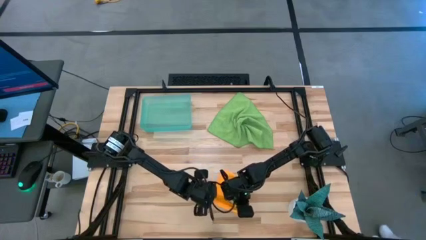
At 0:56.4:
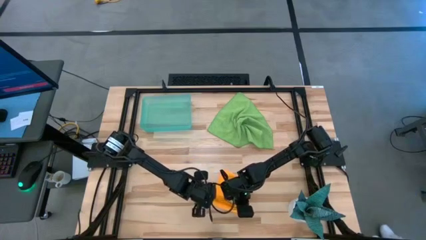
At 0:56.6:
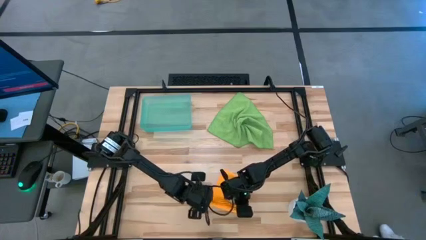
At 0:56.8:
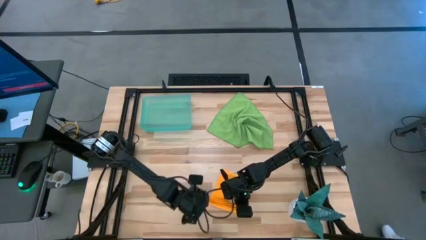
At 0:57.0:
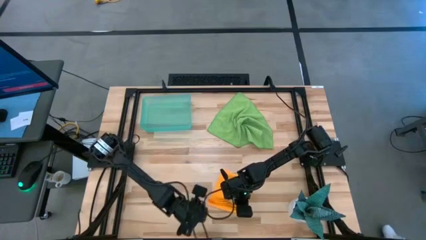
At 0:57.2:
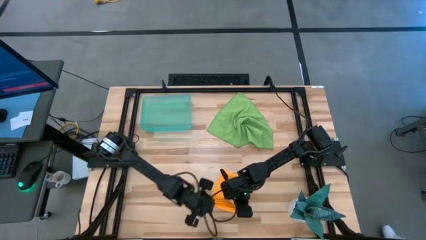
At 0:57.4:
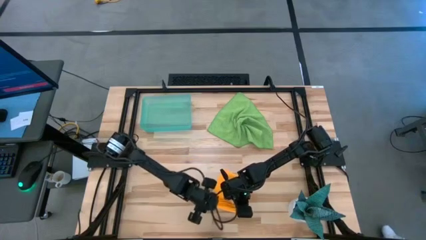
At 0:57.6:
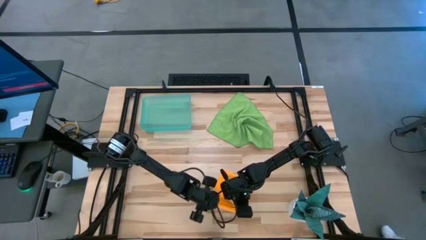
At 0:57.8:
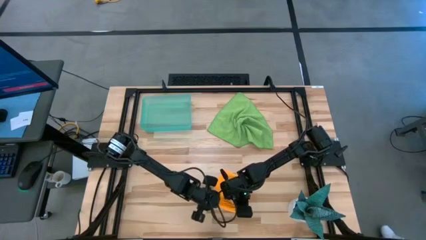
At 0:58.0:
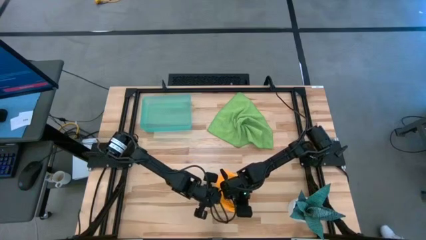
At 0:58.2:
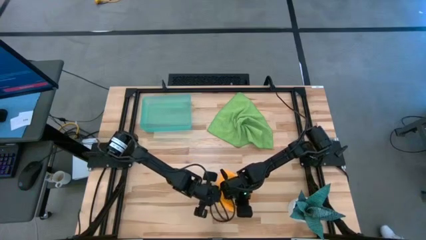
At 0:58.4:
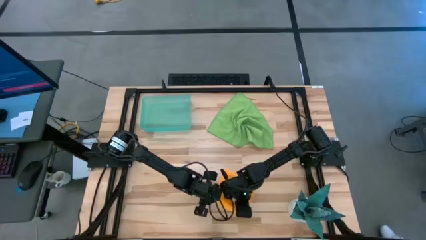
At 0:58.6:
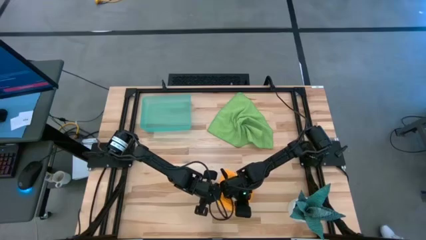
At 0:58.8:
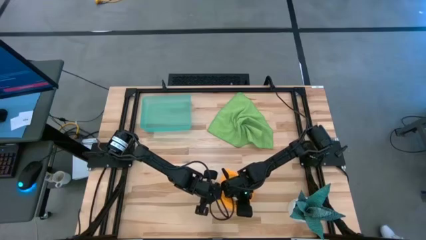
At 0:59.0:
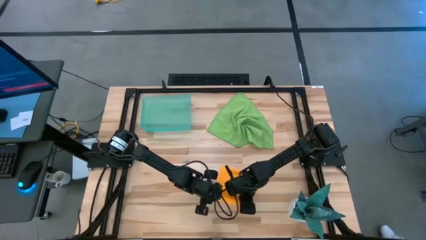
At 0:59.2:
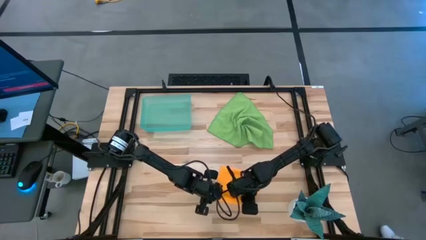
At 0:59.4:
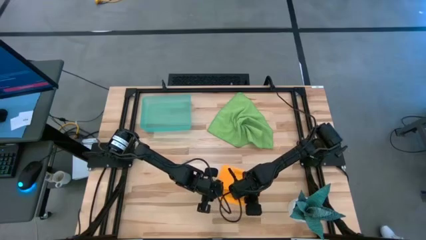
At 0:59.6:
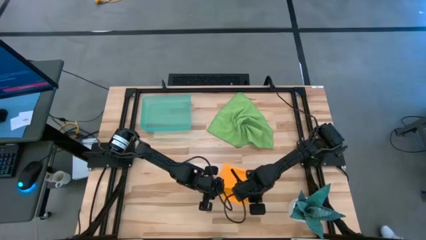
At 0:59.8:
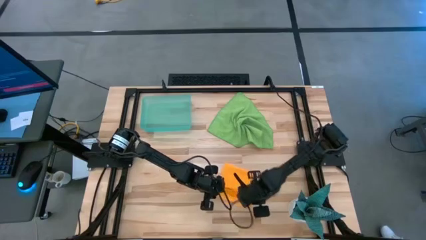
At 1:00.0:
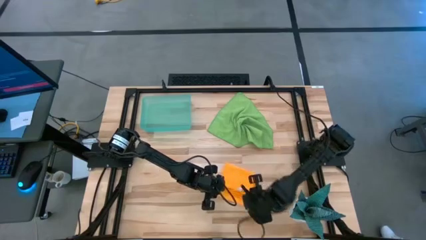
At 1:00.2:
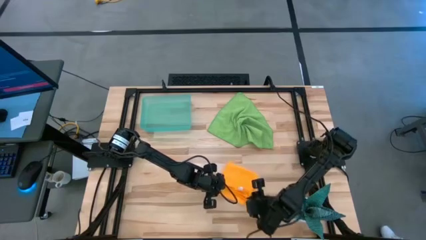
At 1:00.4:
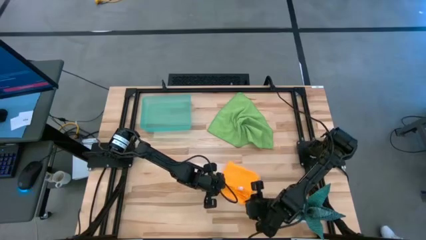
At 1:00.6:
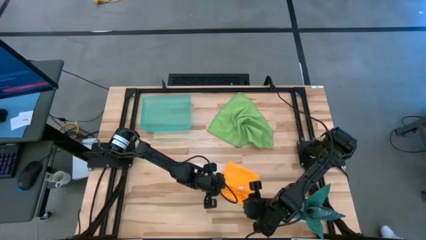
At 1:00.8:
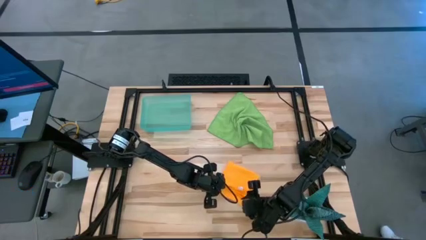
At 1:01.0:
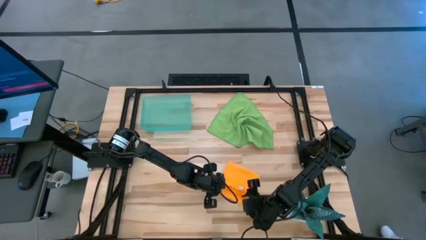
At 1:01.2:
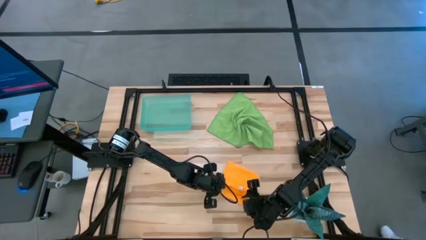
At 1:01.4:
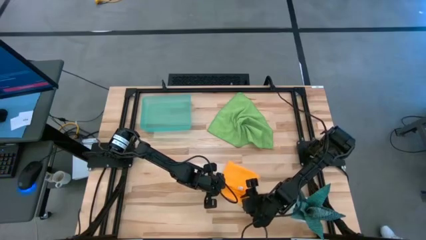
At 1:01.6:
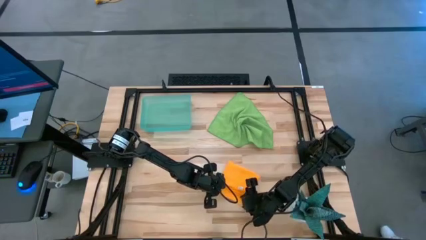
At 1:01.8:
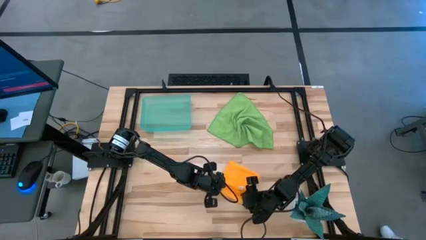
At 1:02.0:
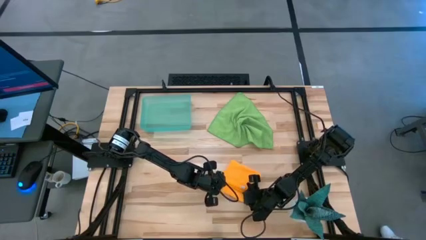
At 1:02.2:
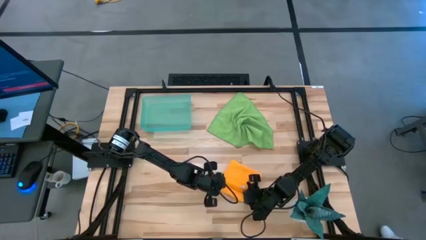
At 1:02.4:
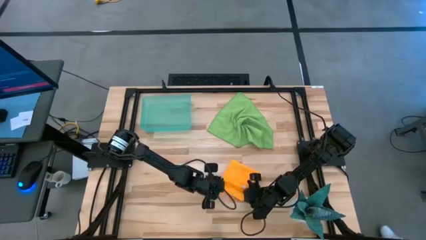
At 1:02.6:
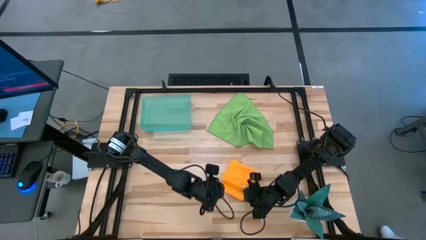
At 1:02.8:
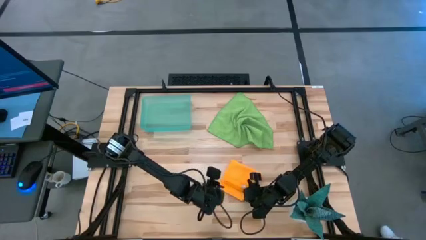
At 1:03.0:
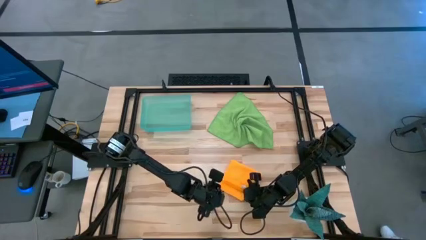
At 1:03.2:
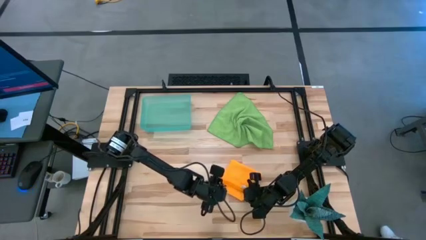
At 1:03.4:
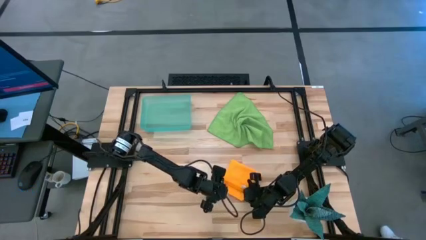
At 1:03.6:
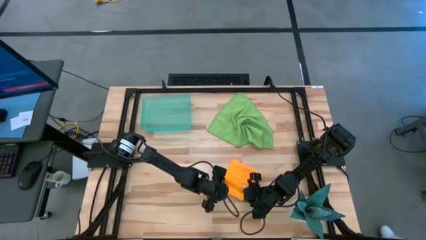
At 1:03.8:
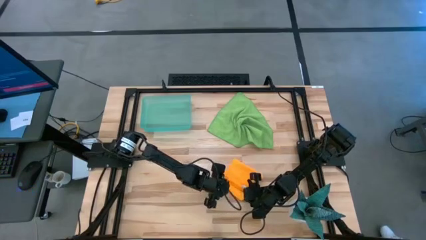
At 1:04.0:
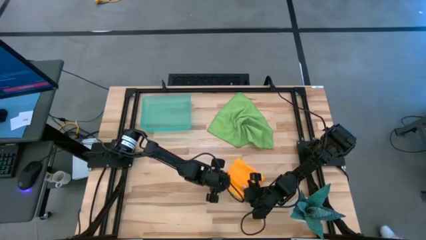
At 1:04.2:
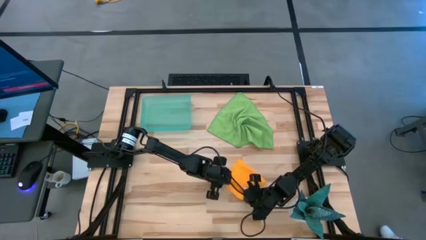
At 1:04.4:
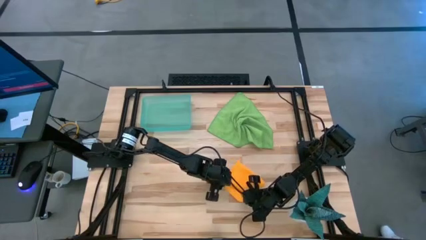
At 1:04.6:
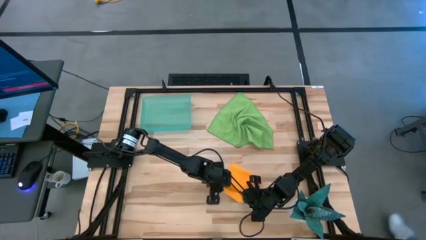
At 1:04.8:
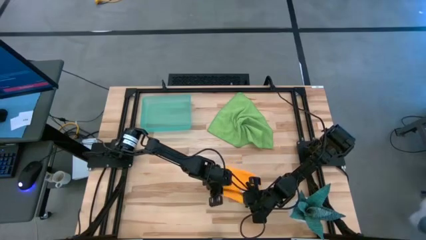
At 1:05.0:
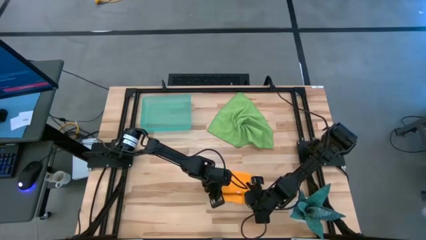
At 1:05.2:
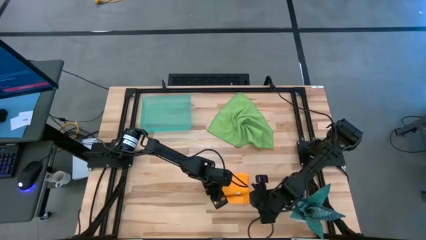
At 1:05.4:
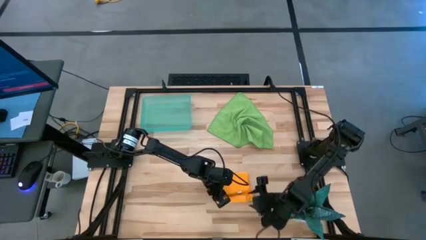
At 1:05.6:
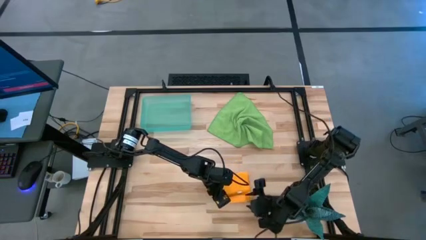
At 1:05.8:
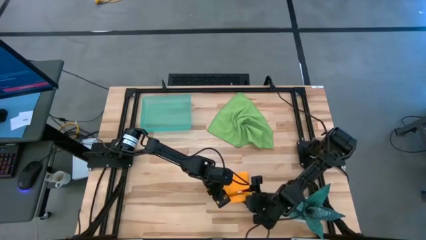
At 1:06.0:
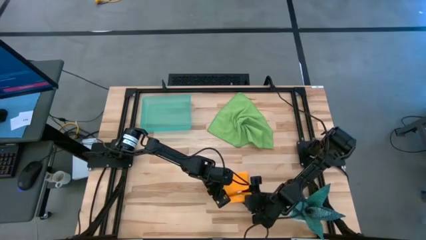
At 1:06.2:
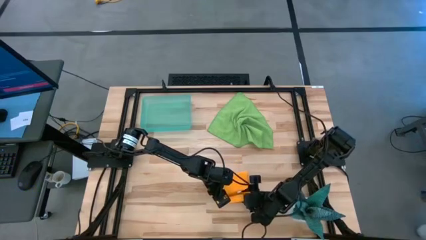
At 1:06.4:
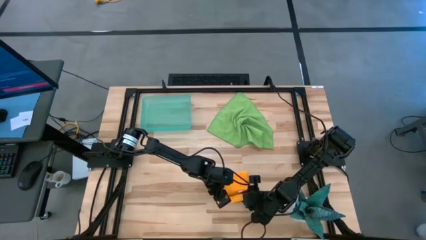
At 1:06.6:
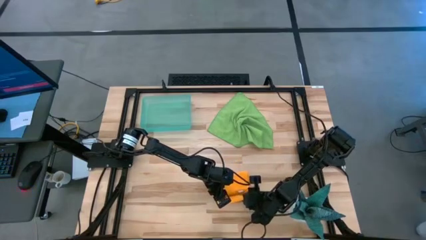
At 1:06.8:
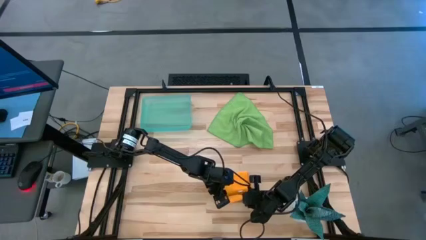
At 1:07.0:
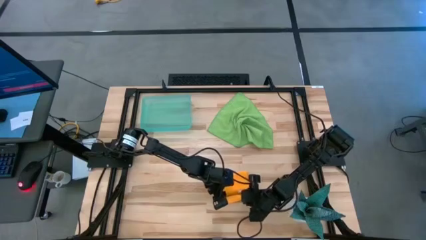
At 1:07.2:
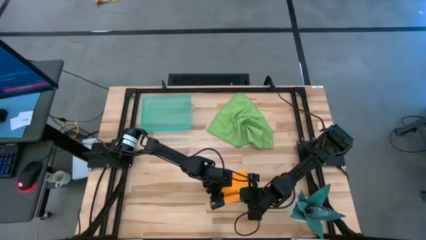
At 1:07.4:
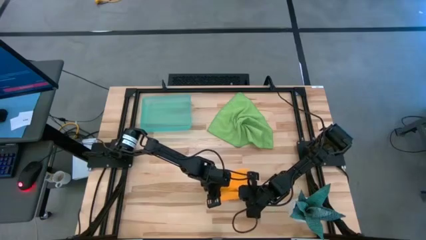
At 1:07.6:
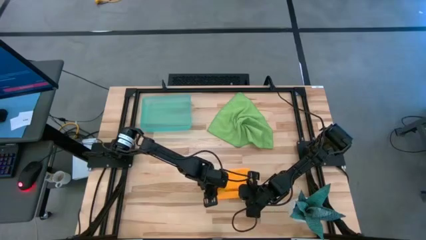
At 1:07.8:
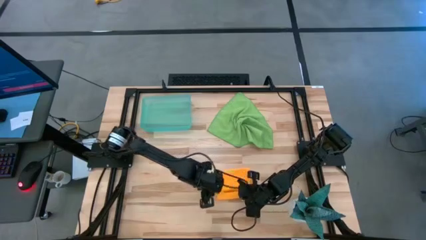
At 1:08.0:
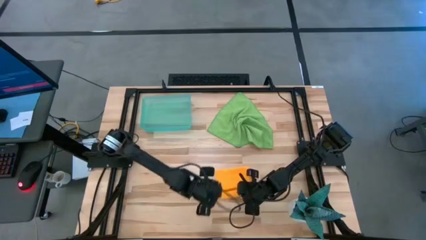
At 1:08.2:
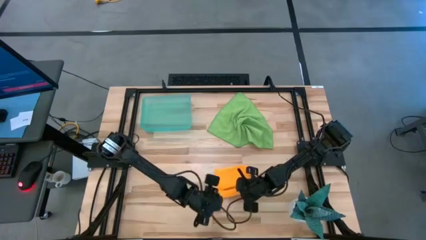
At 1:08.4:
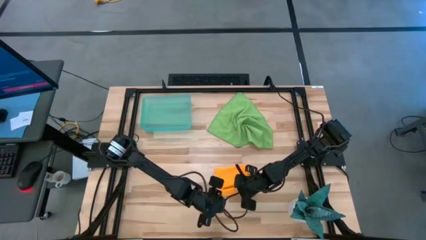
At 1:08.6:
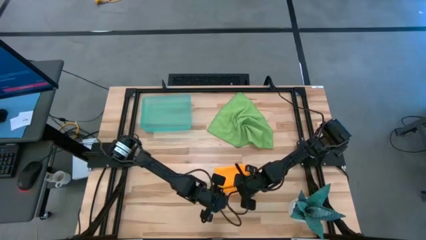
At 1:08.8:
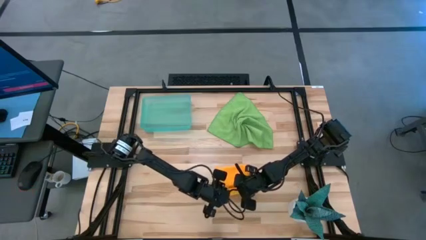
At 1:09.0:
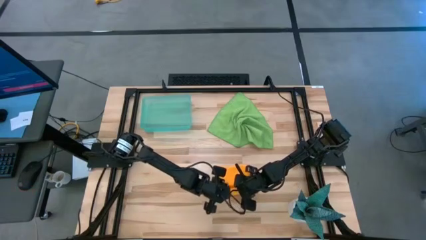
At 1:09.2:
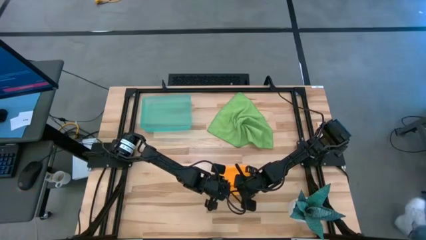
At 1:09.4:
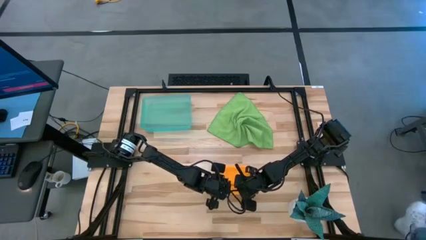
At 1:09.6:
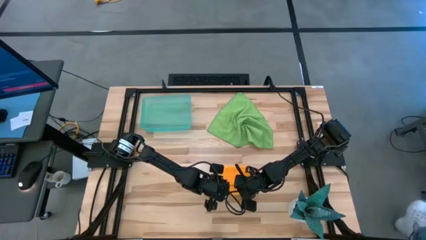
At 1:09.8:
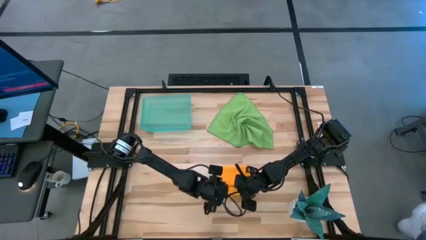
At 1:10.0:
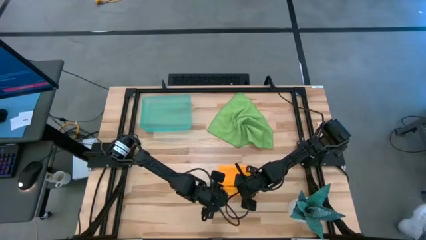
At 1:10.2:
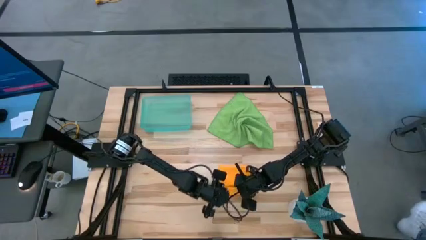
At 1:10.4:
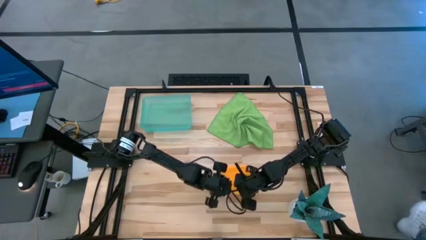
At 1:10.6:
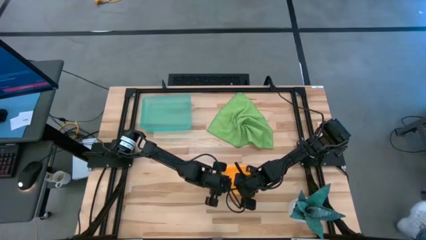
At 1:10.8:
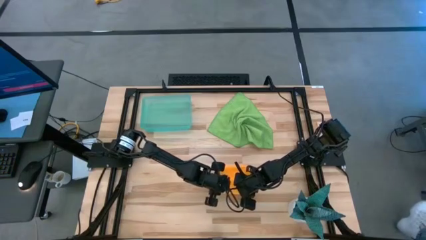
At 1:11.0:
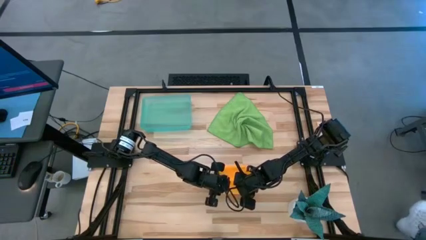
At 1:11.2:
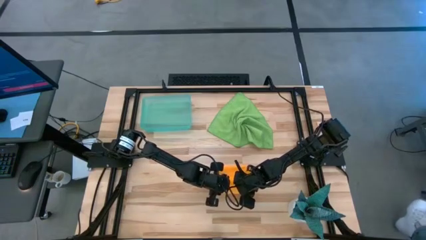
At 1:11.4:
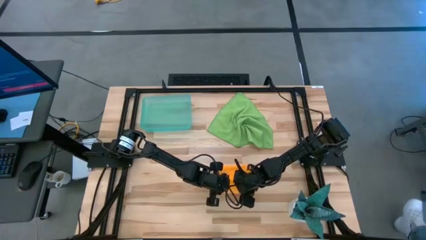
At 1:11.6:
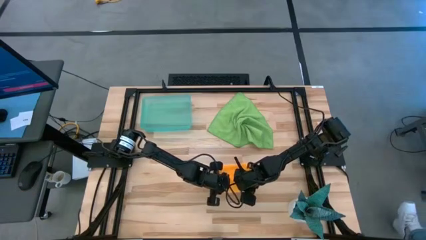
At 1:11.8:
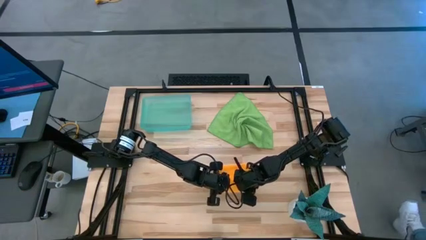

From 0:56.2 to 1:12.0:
Task: Roll microfiber towels into tight, uniform cylinder then place into a basket
Roll the yellow towel
